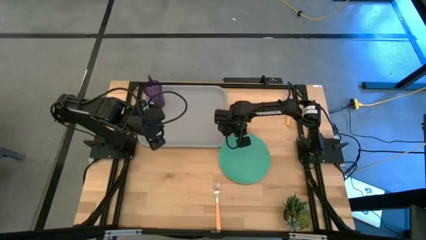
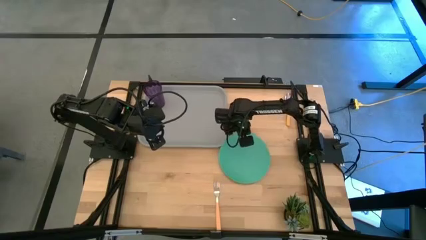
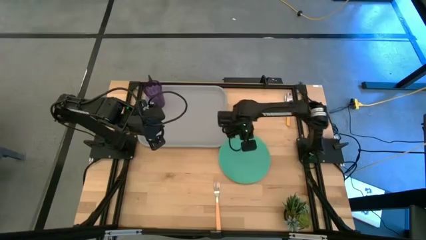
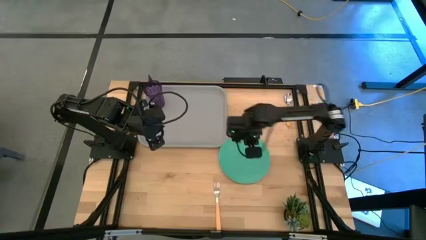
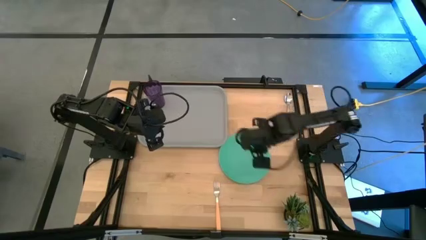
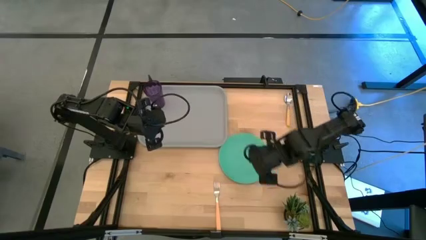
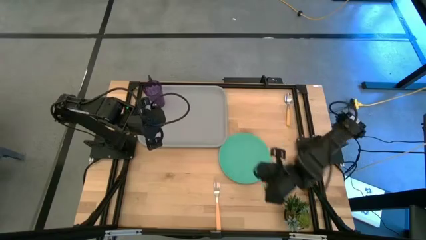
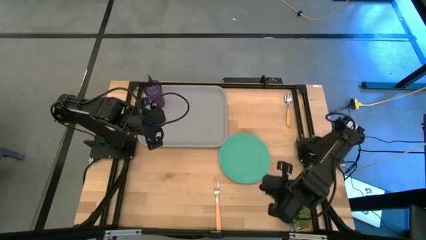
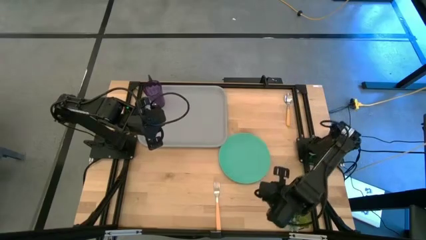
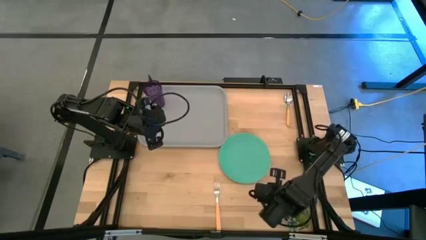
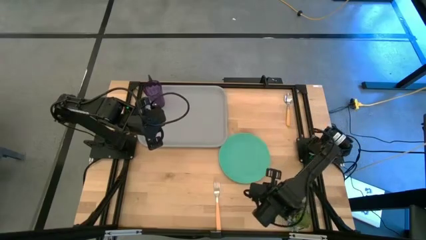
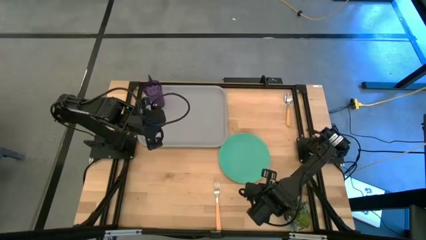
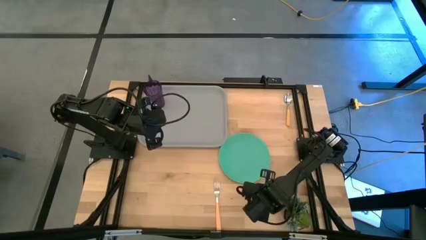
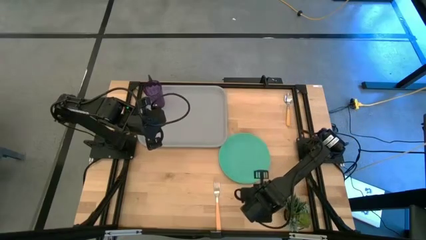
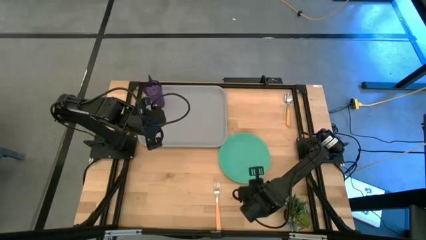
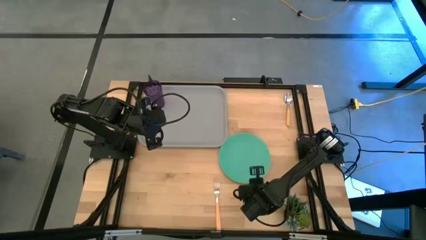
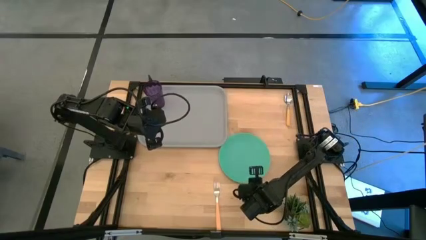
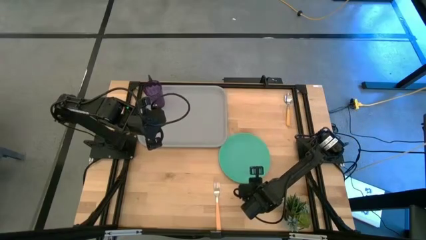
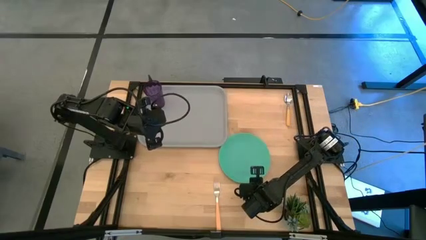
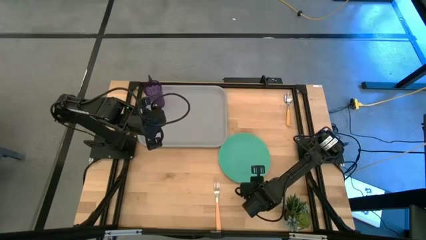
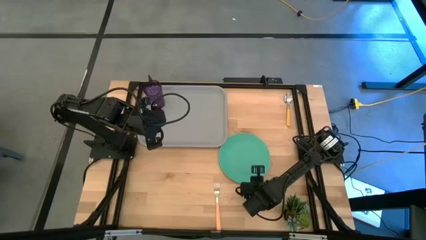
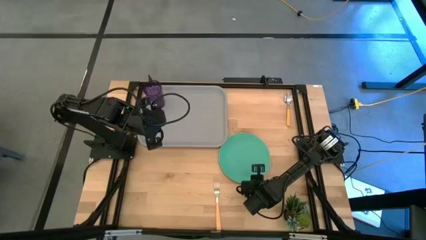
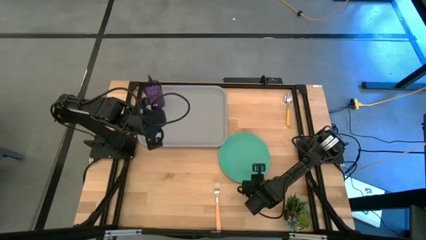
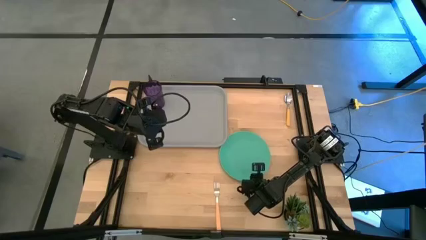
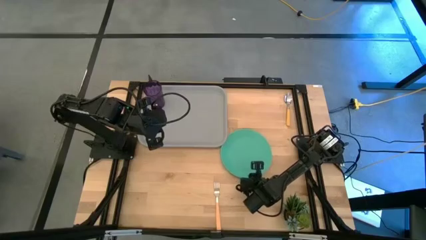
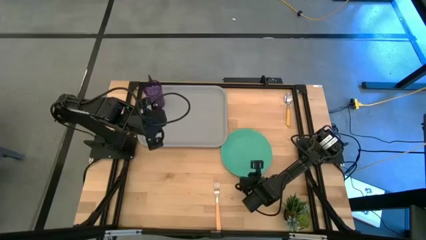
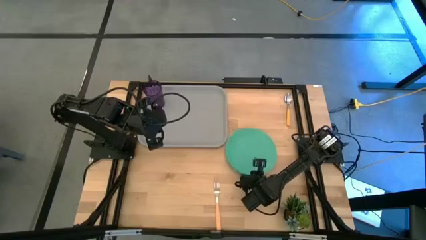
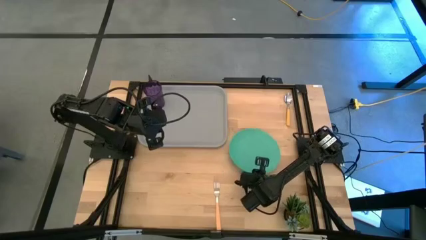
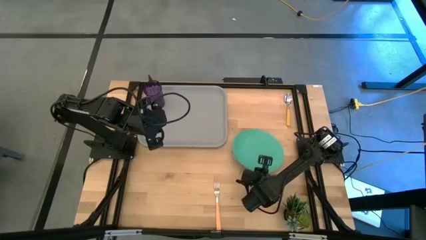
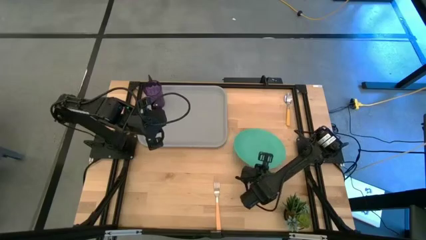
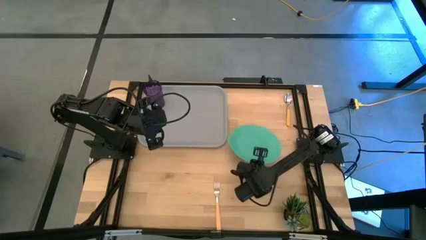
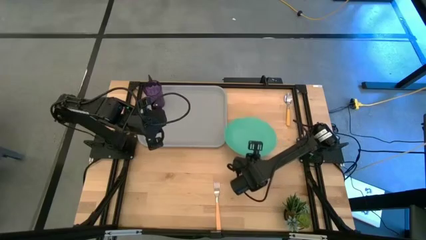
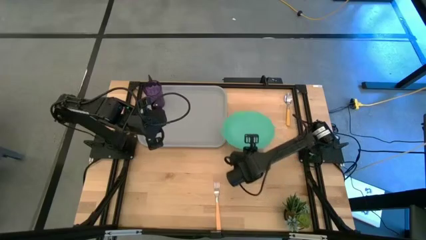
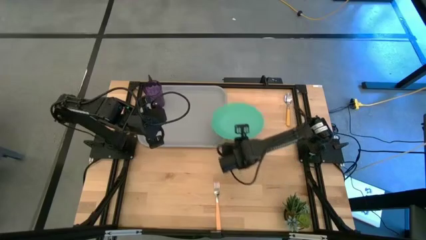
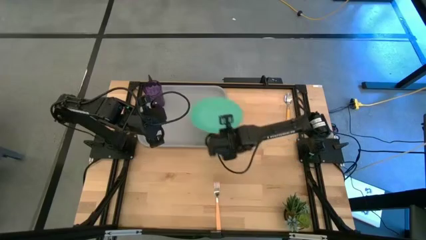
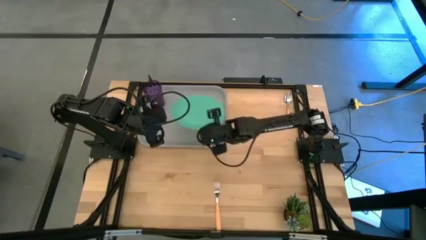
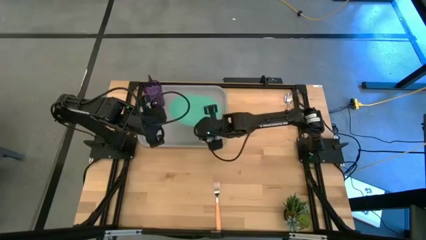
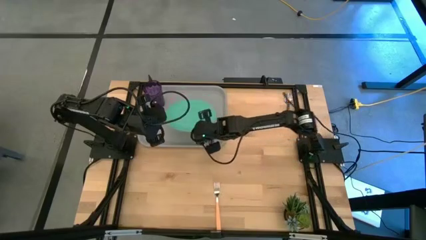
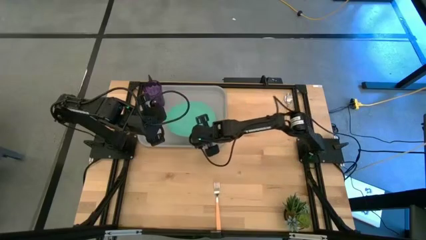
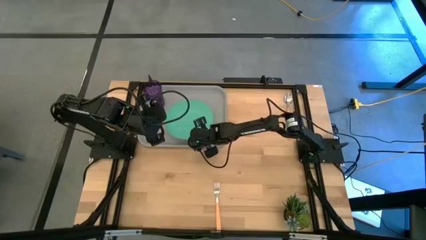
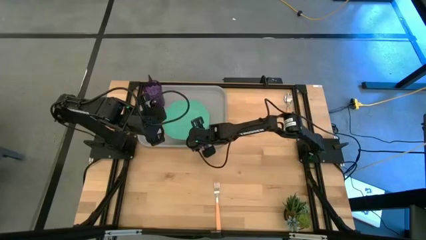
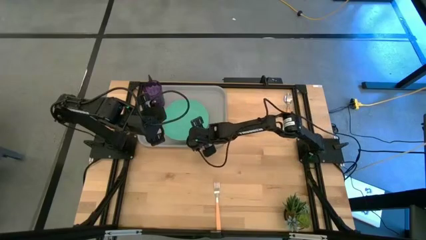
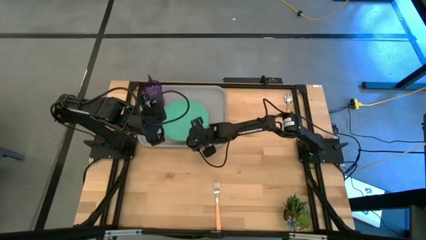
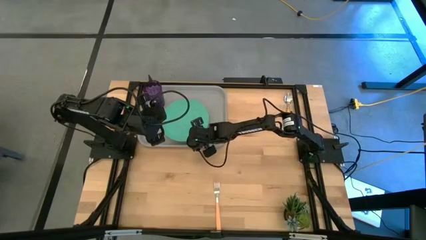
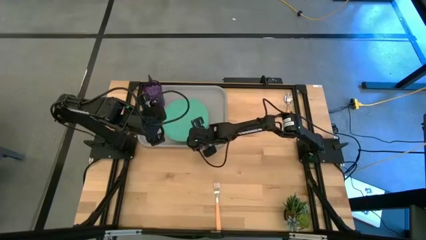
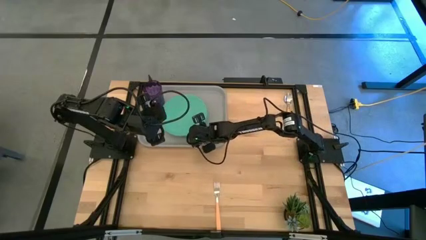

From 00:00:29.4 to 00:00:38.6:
Task: Pick and place plate/cup/fork/spoon on tray
Put the green plate on the bottom right of the purple cup

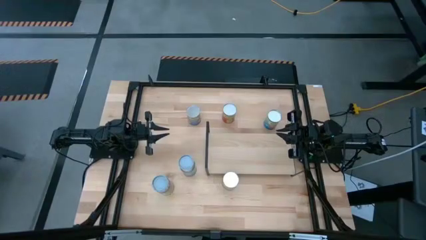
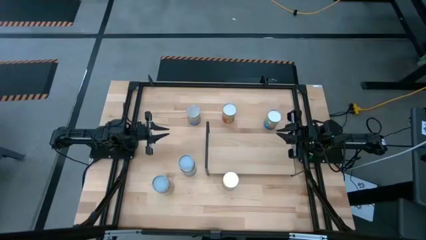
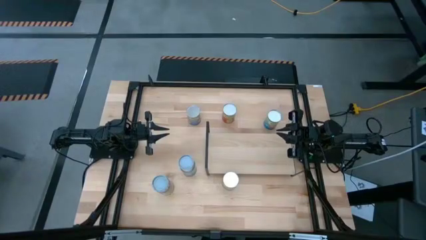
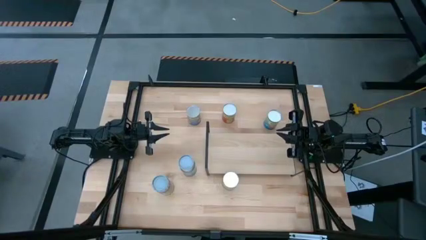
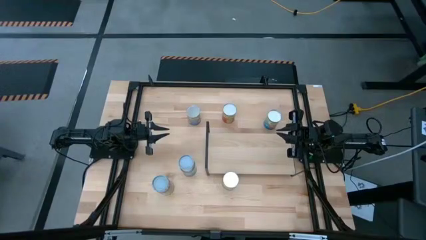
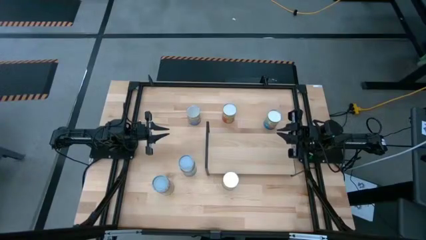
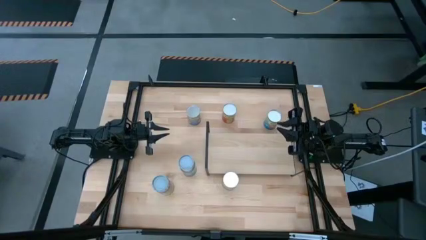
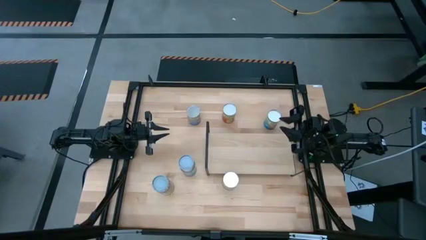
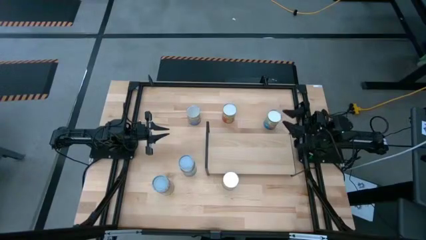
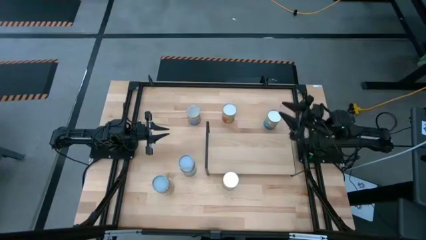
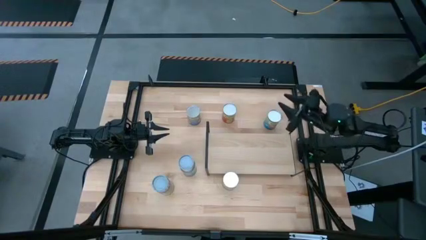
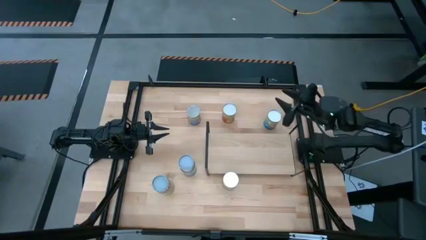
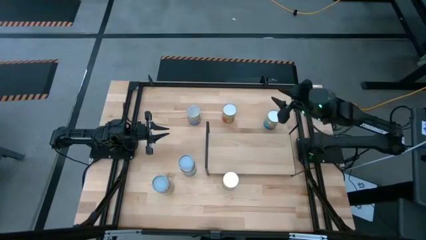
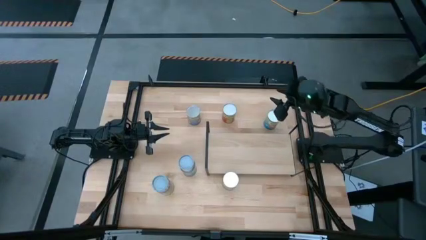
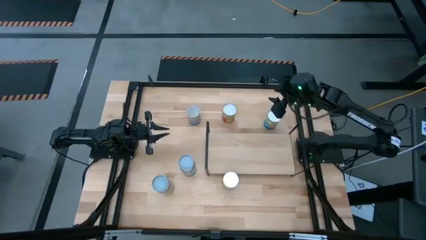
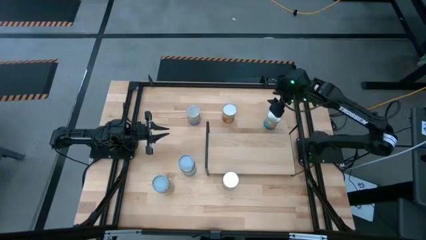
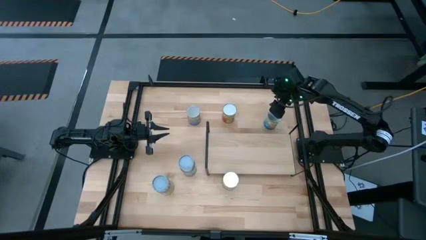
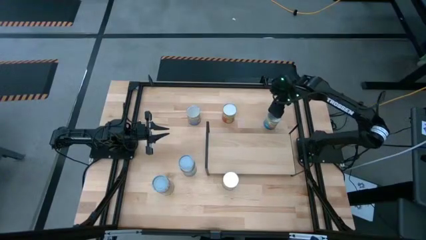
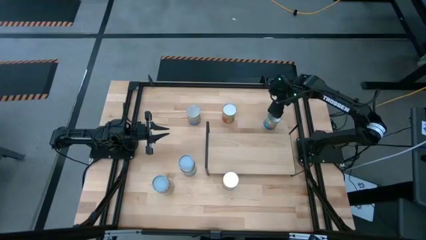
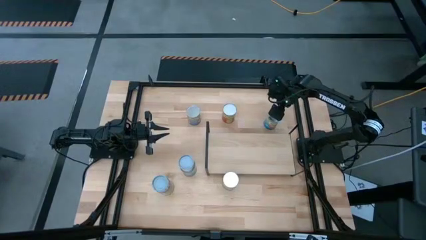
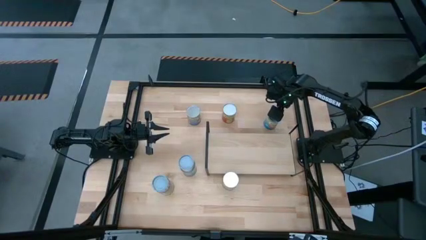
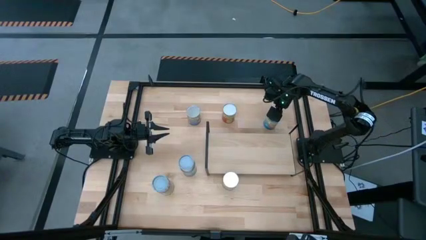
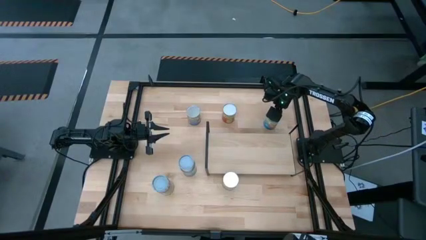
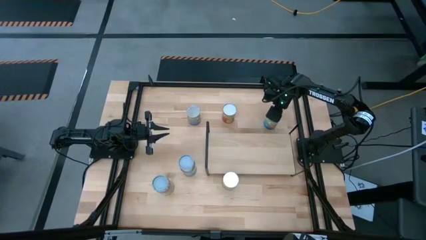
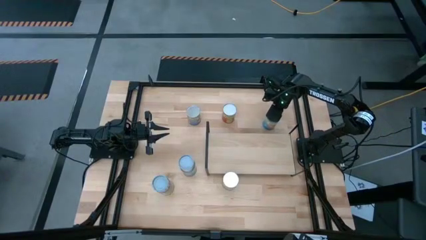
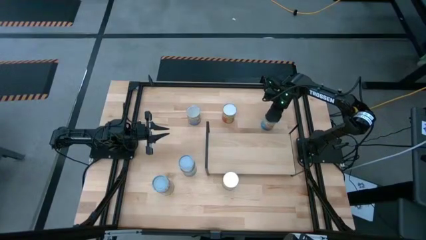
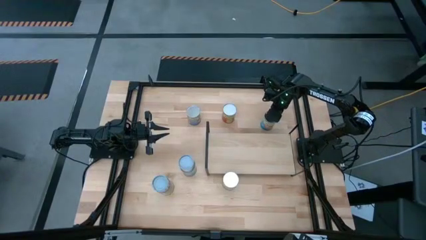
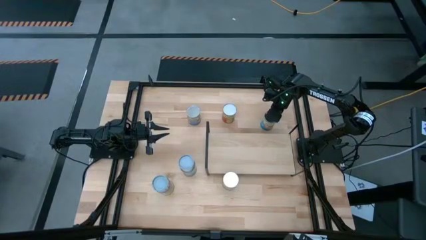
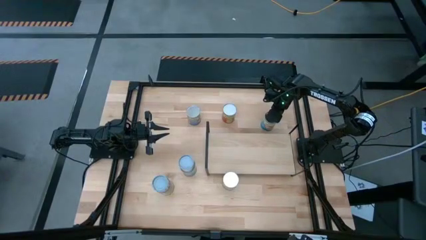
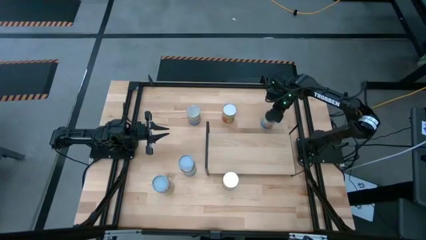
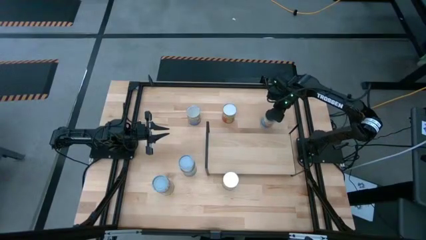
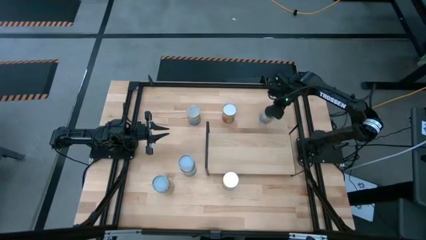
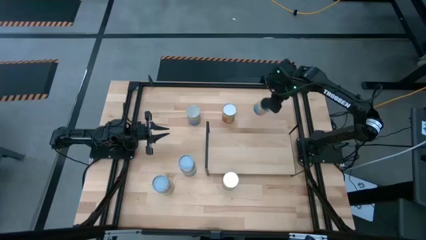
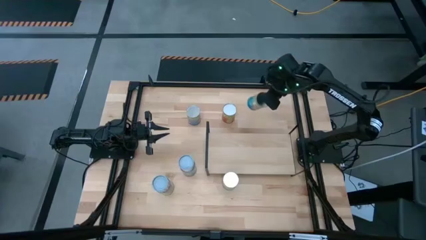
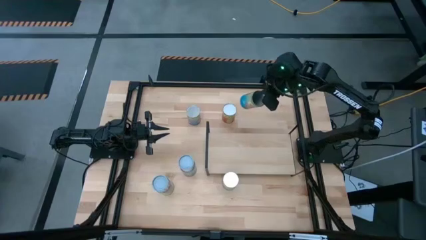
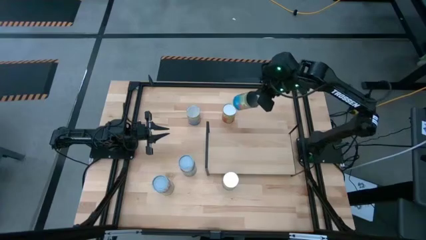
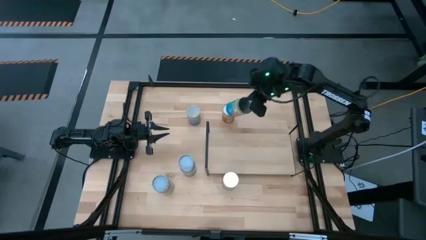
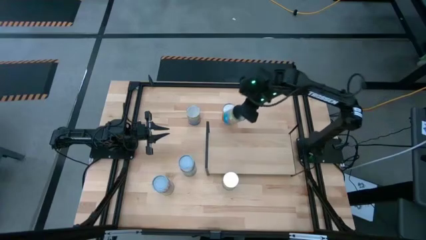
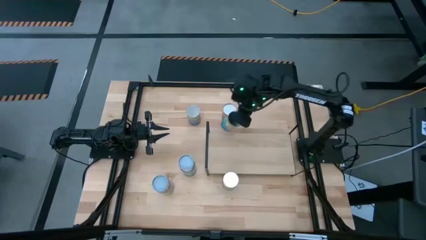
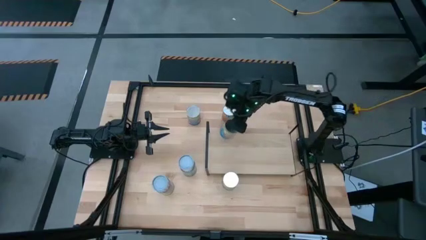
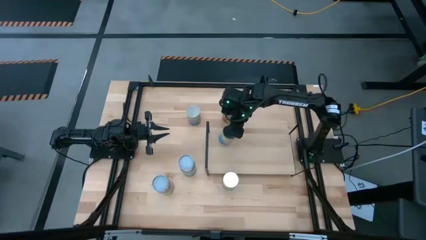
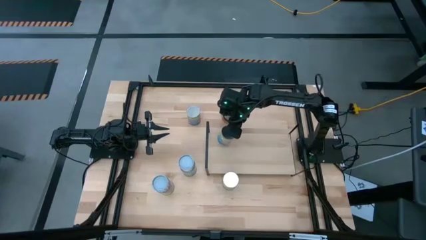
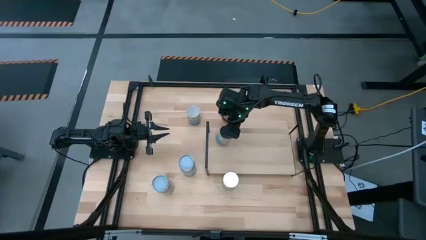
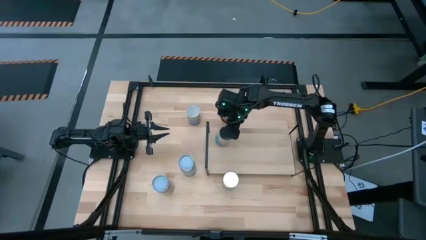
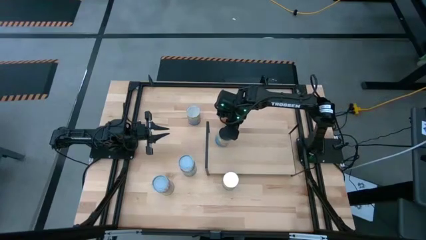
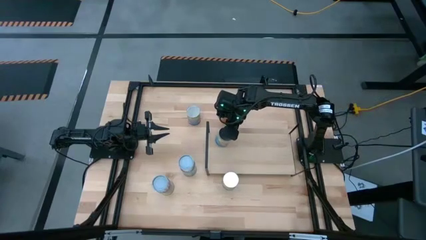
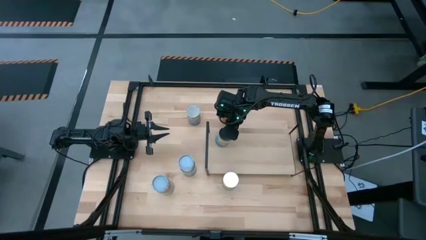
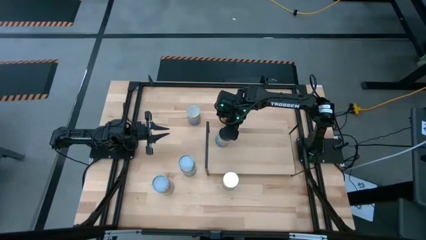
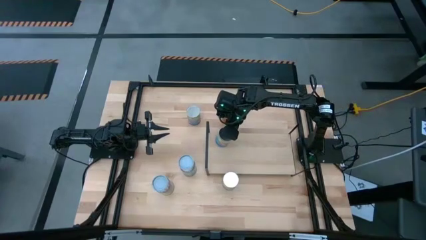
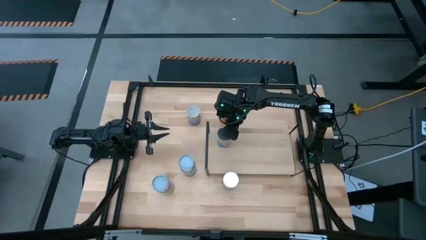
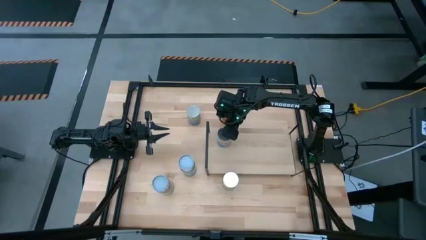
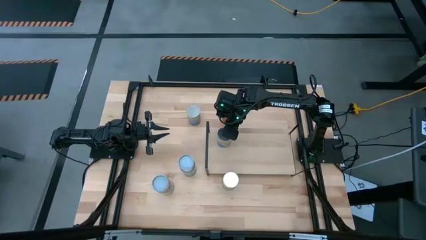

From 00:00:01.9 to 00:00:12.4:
Task: Pick and place cans onto a shelf
Put the canned tomatoes on the shelf
